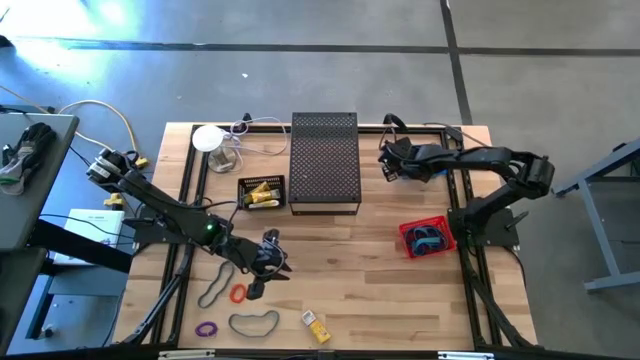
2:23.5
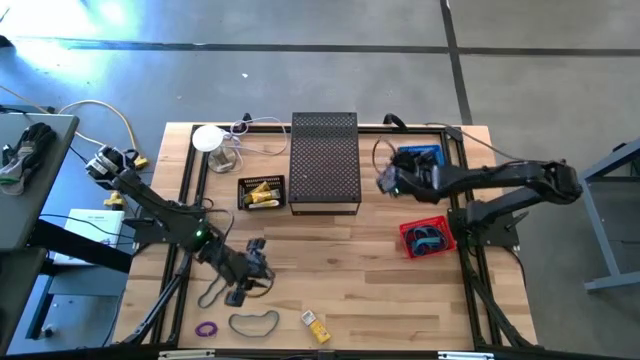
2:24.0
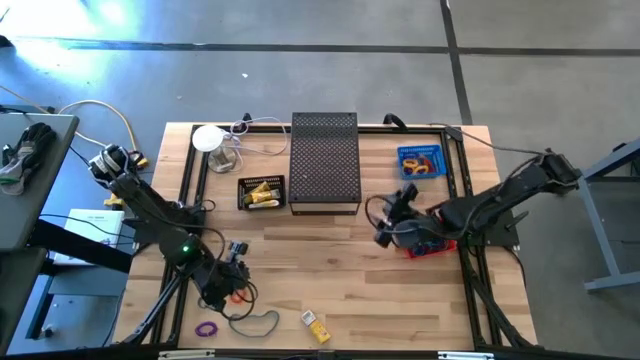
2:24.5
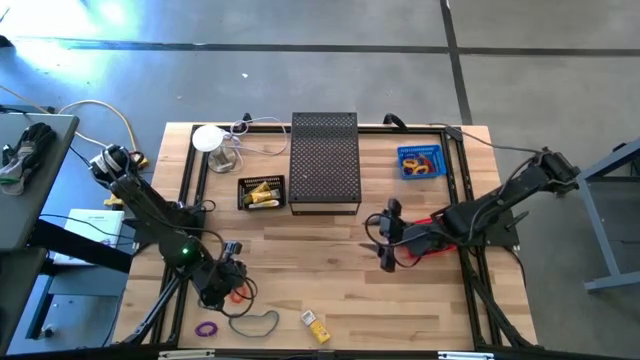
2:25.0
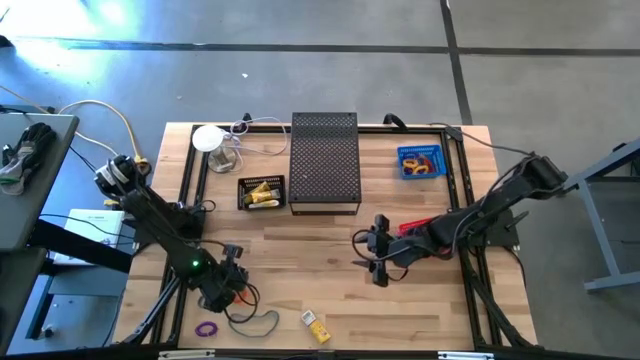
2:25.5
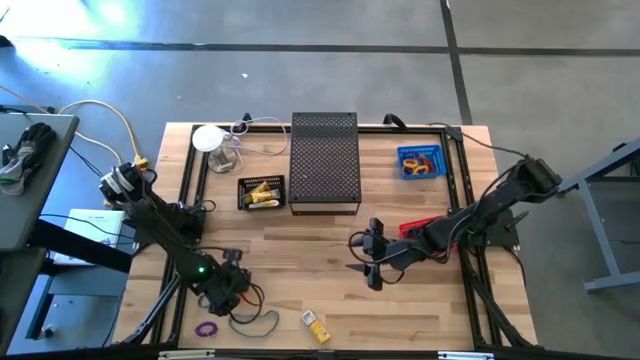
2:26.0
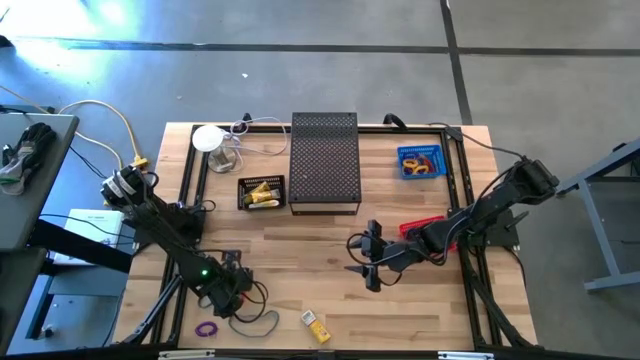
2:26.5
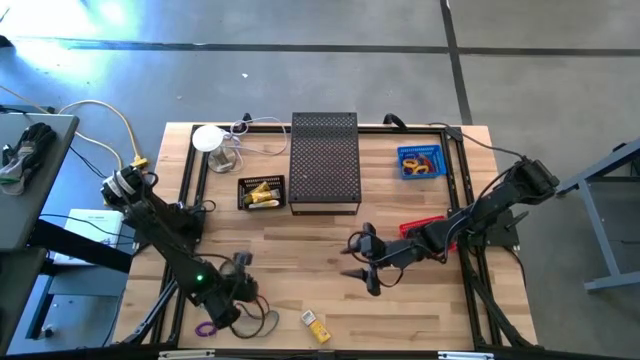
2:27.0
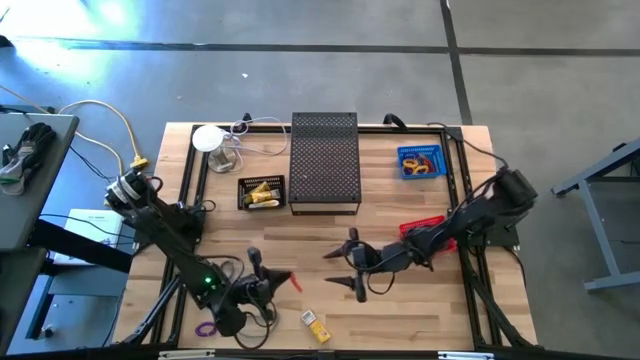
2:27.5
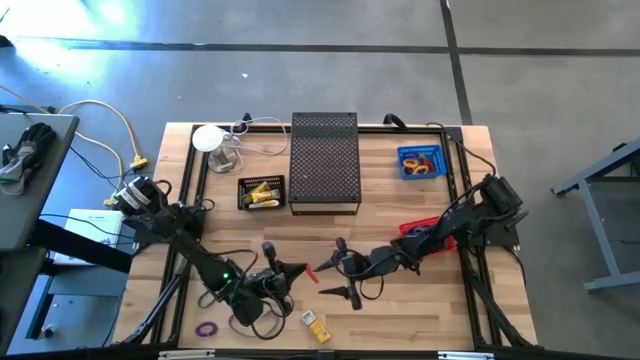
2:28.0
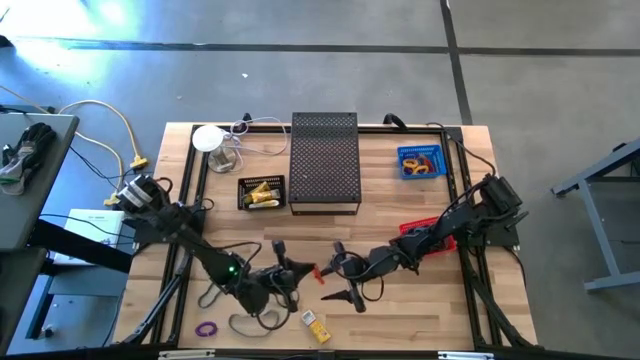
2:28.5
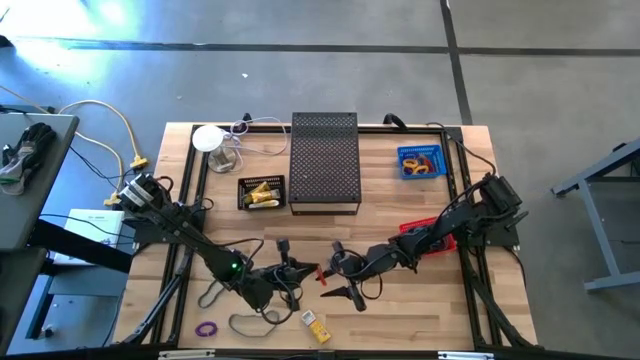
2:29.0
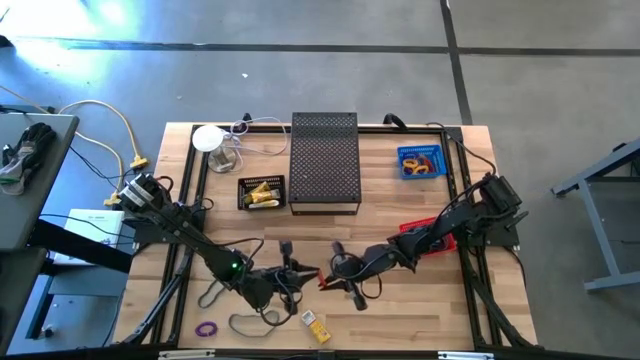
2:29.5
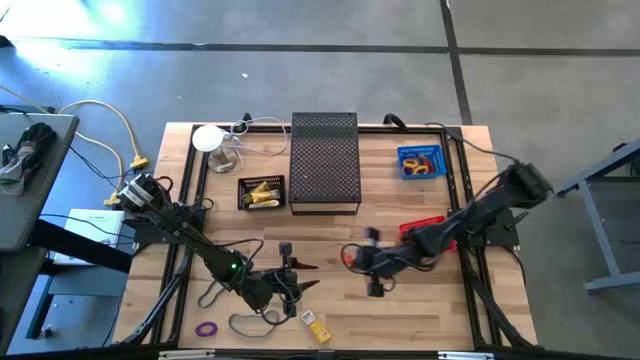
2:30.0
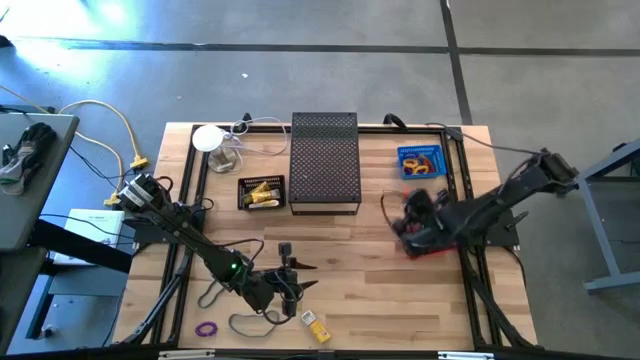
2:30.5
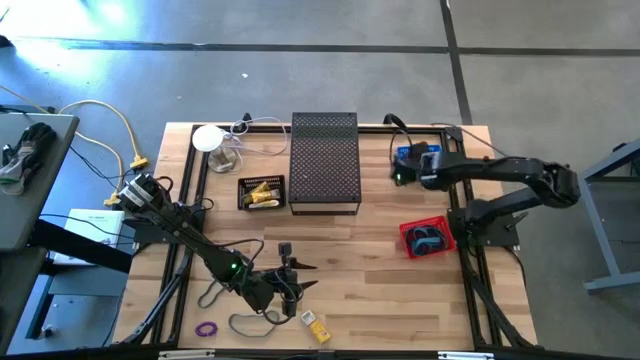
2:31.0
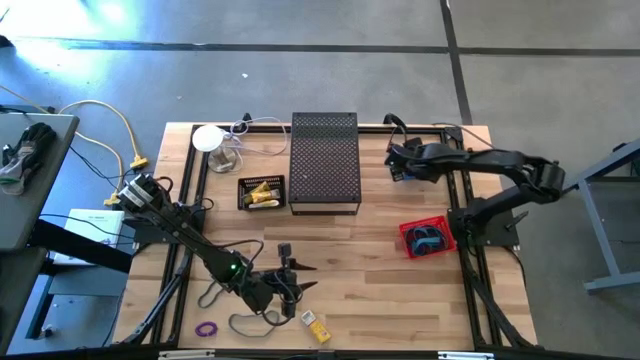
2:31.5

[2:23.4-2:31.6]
Task: Pick & Place Office Desk Supplies
Put the orange spring keychain into the blue bin

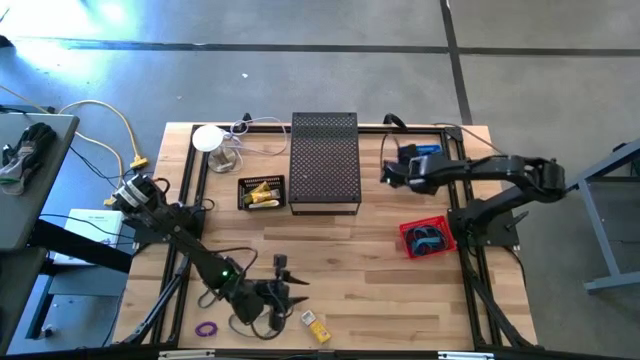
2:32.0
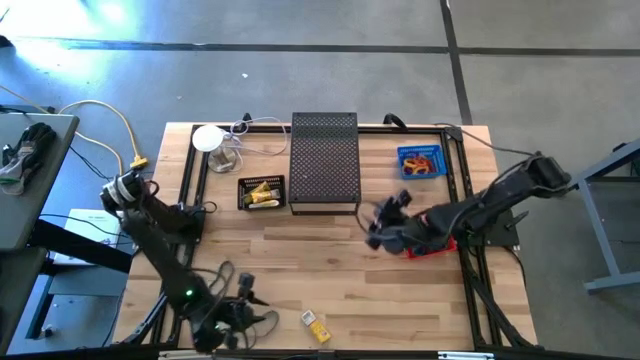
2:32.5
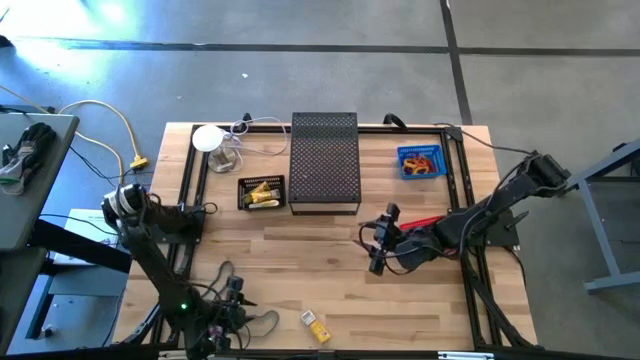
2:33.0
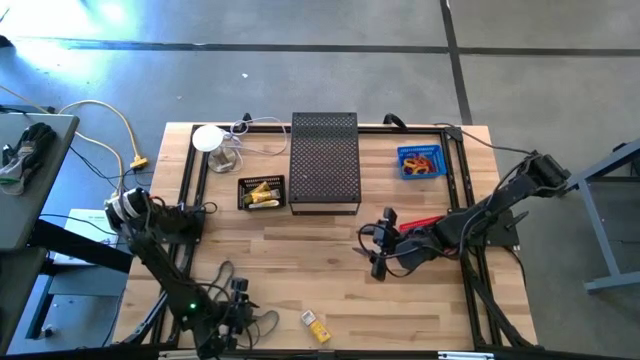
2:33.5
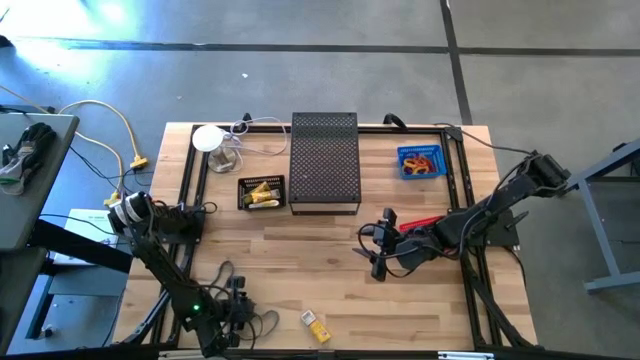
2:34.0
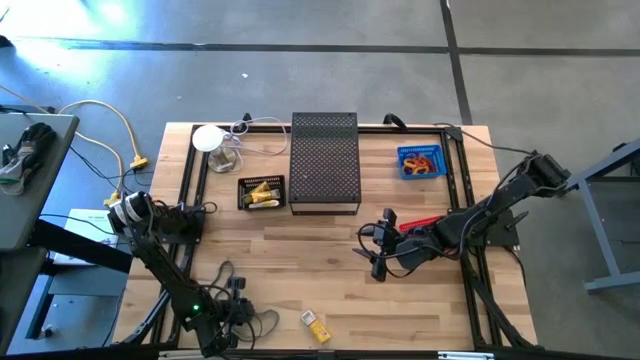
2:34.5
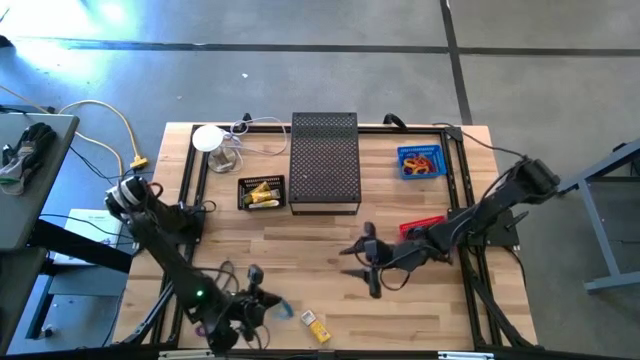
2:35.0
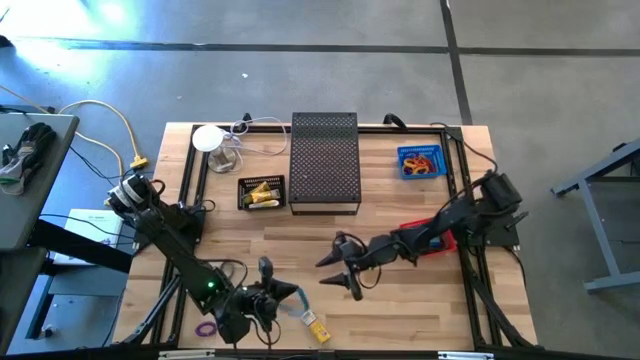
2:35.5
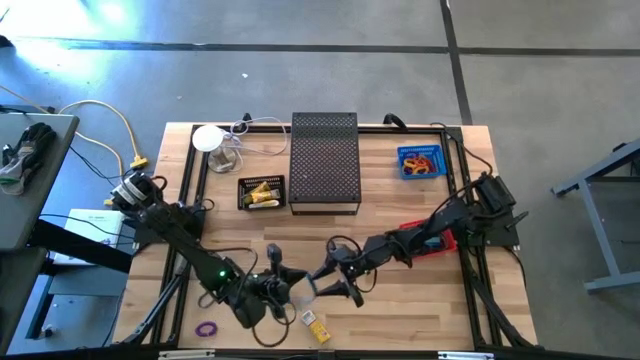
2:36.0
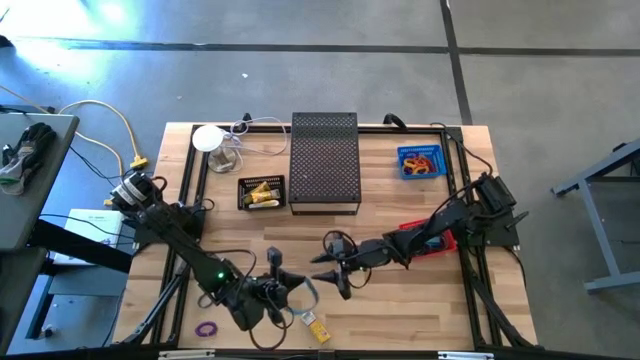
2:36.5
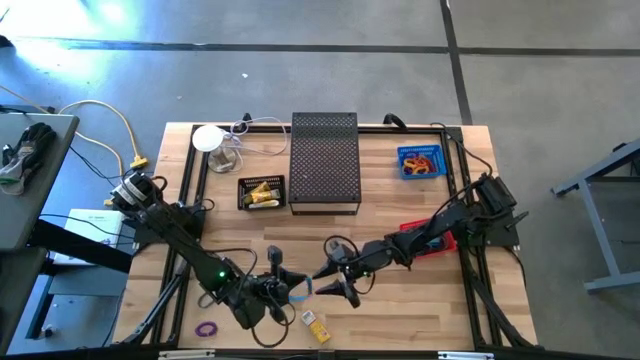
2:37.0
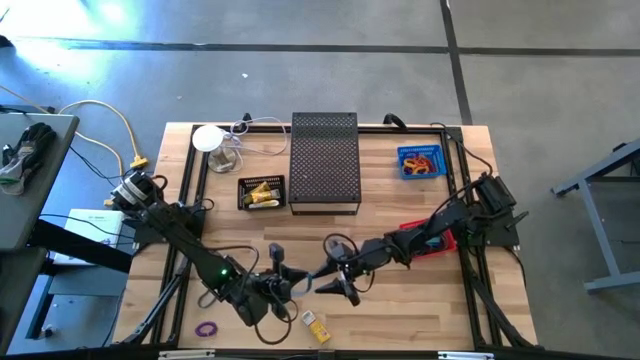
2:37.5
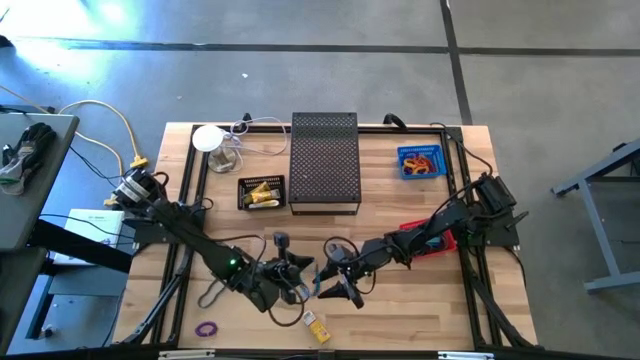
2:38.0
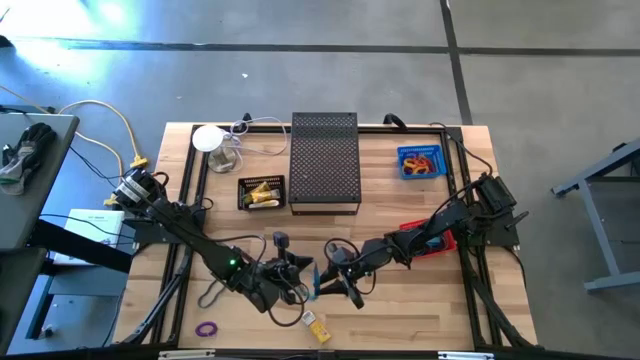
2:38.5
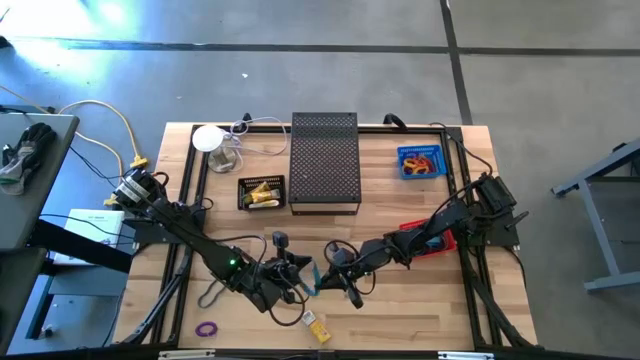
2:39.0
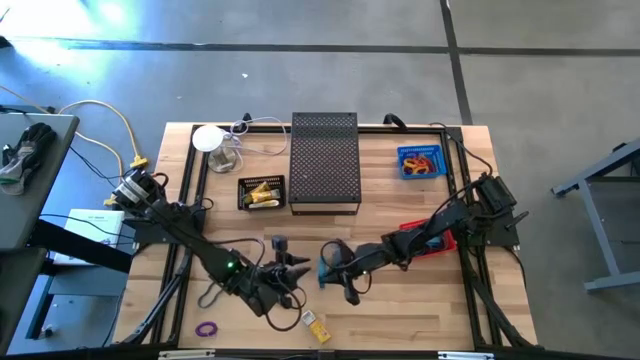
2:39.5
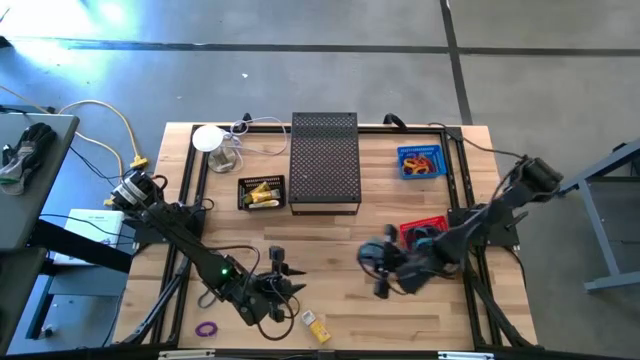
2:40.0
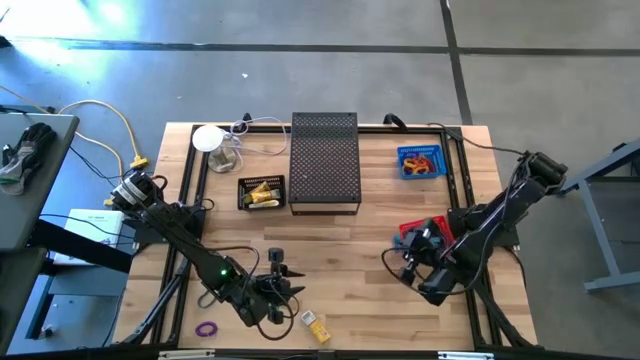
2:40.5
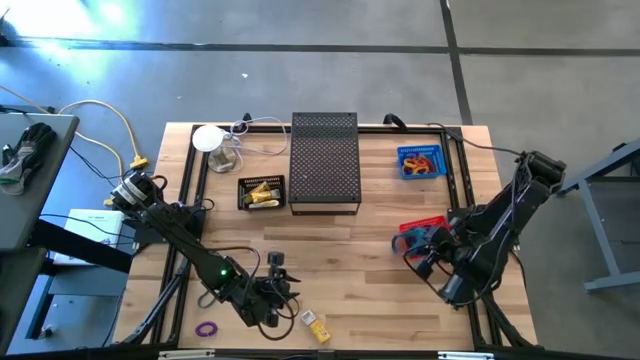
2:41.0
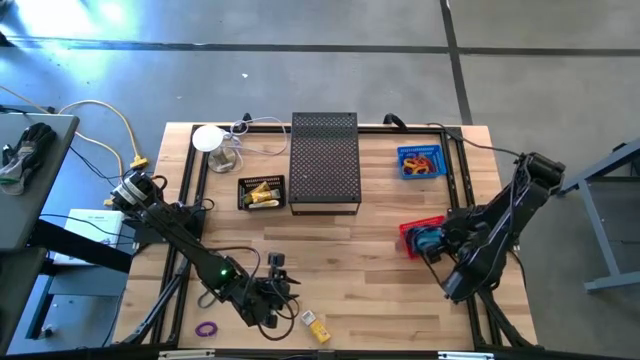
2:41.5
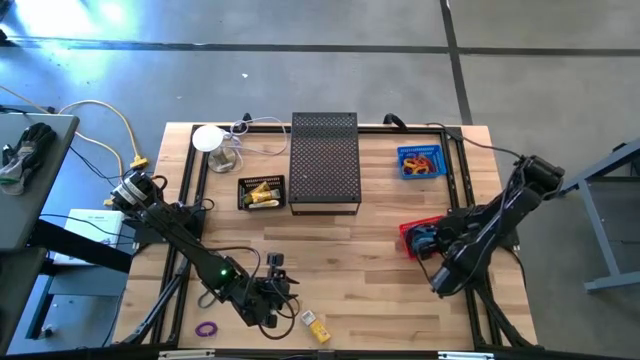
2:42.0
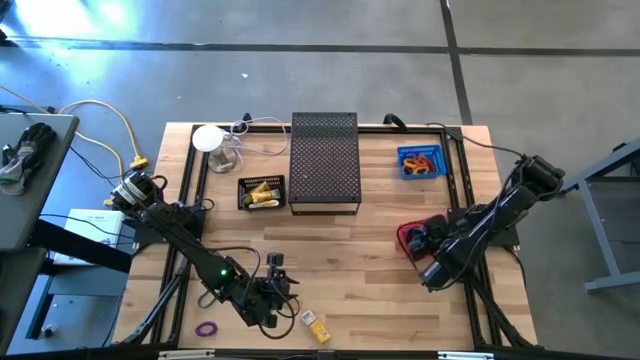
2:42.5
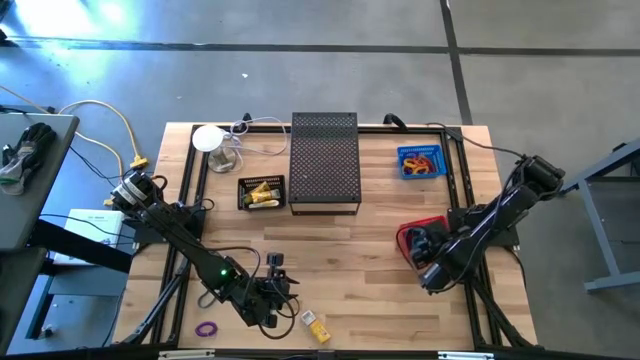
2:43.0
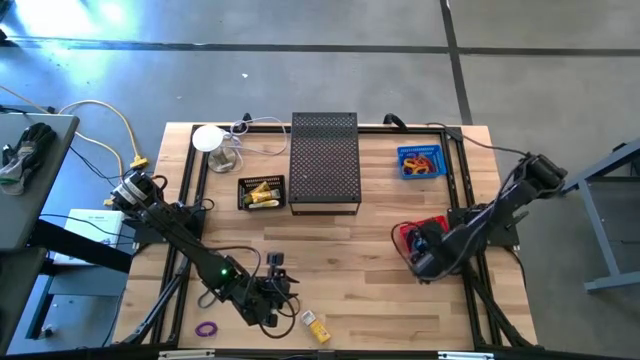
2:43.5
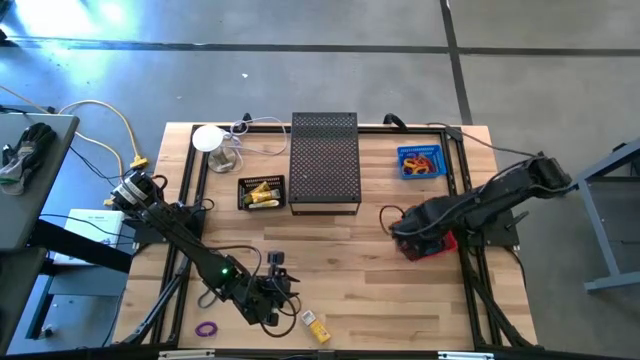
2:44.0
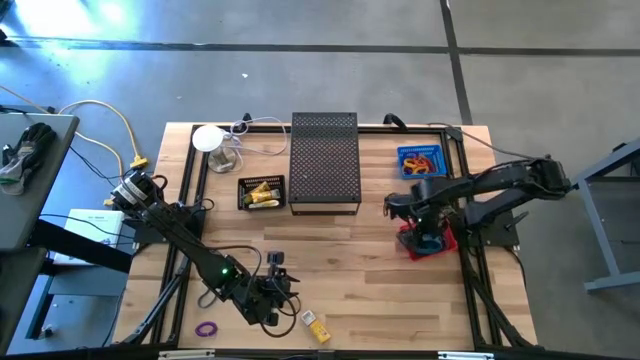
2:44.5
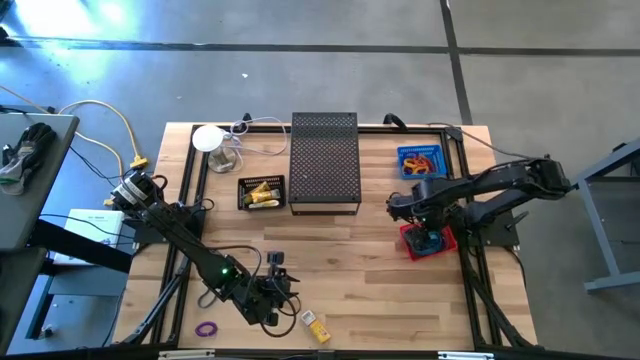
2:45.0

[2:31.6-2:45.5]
Put the blue rubber band into the red bin
